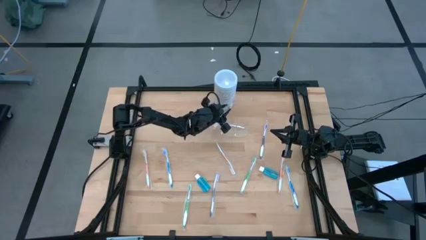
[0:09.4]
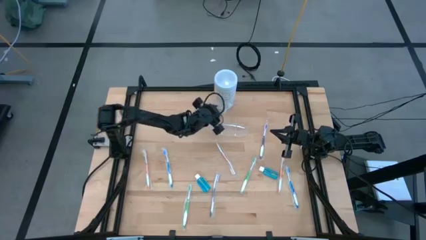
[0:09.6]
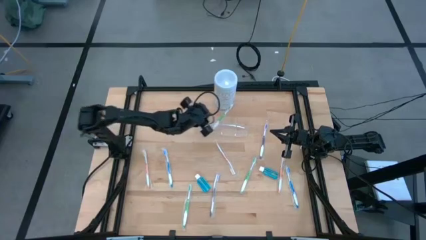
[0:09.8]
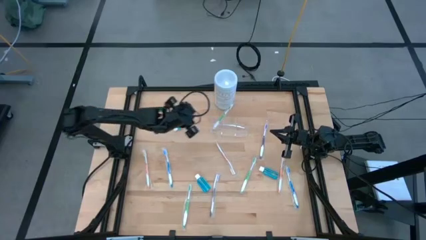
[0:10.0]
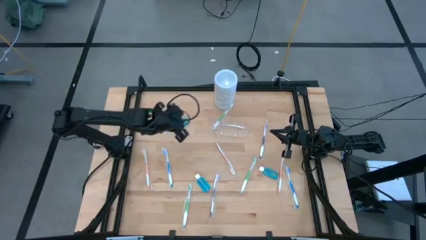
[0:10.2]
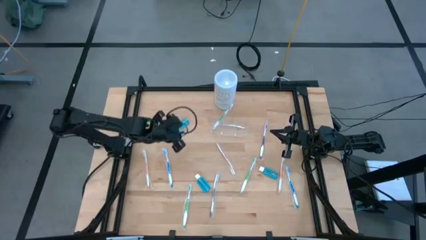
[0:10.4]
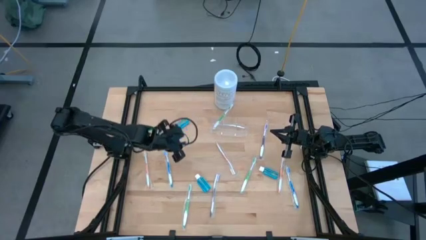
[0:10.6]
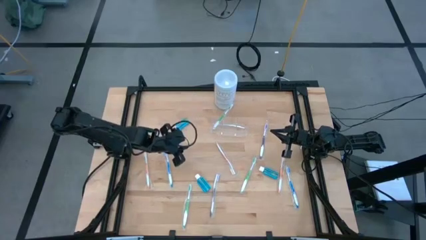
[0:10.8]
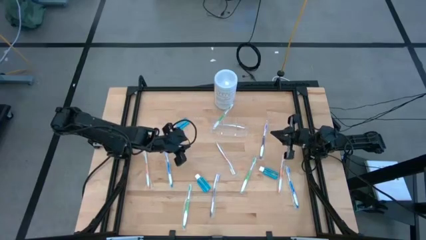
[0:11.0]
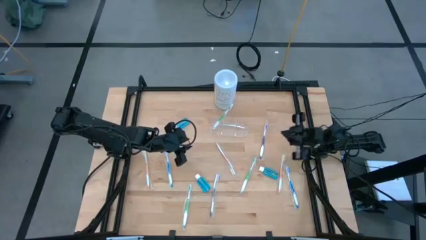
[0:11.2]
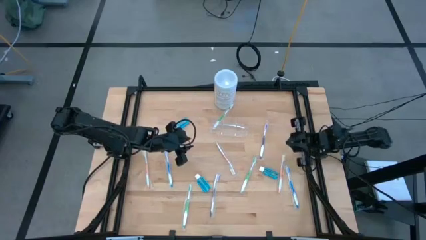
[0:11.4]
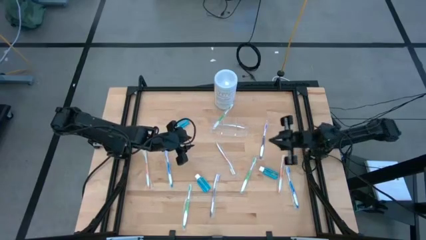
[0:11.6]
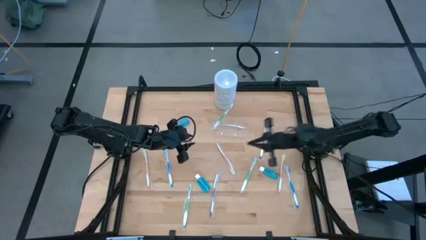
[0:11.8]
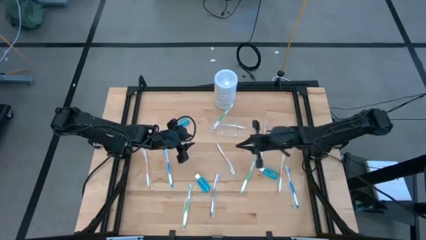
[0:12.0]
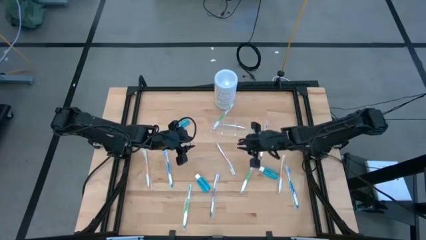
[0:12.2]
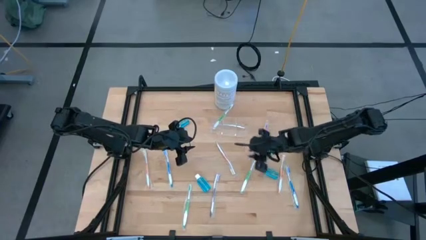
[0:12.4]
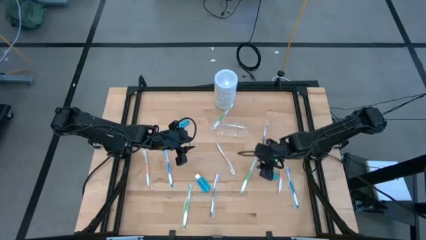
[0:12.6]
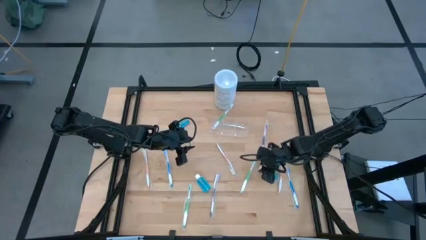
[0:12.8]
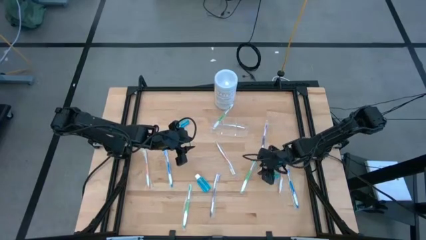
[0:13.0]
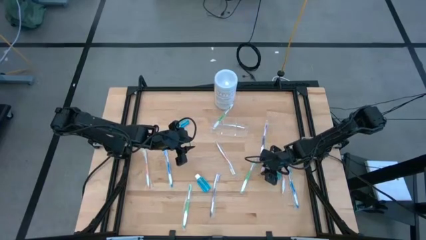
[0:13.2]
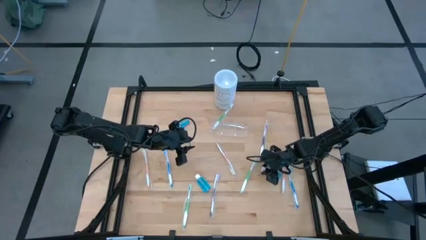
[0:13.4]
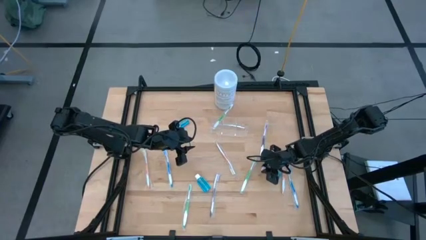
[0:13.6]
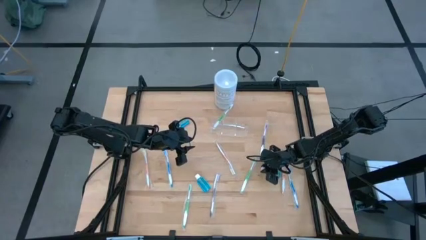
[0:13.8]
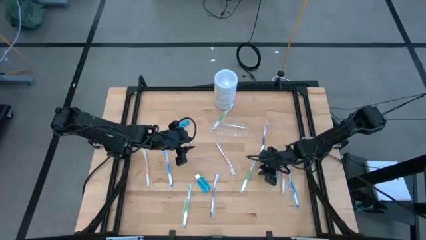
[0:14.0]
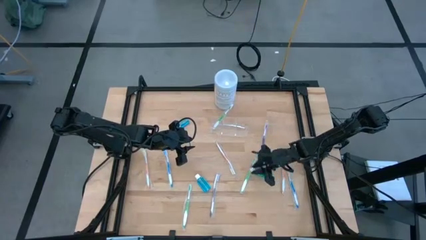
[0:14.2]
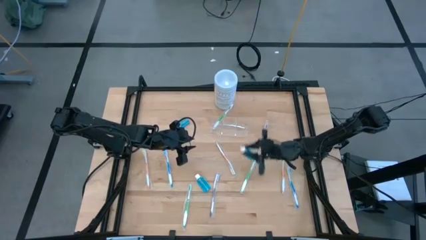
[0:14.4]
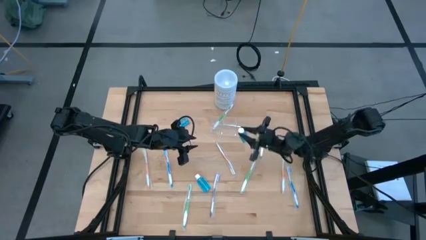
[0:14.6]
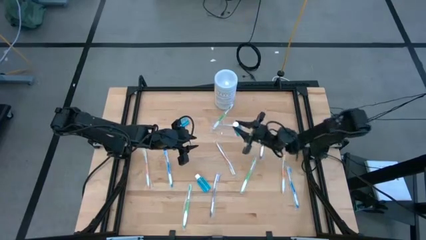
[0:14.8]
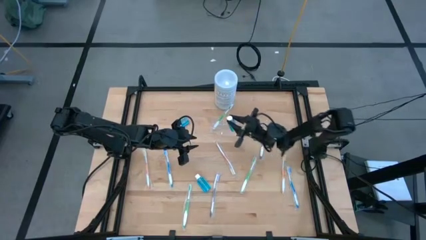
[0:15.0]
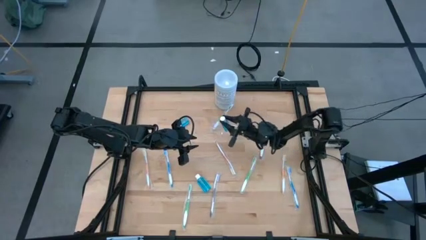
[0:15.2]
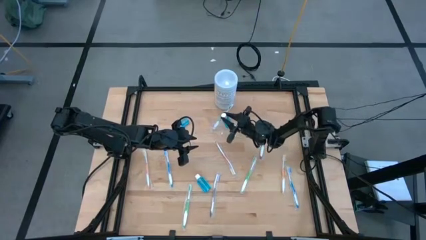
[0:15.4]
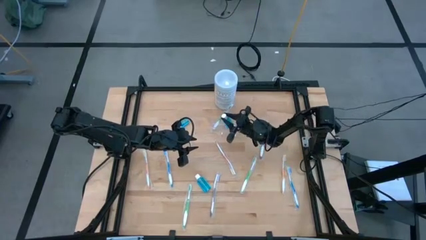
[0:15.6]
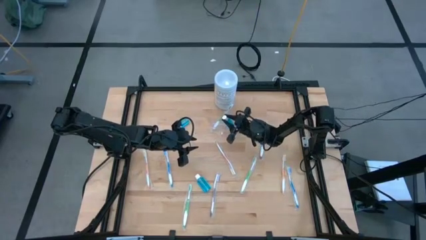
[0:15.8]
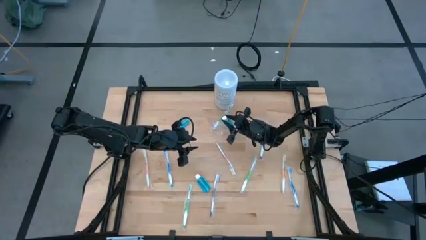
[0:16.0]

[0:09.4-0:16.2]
Task: Pick & Place toothbrushing station
Put the bottom right mouthwash into the transparent organizer

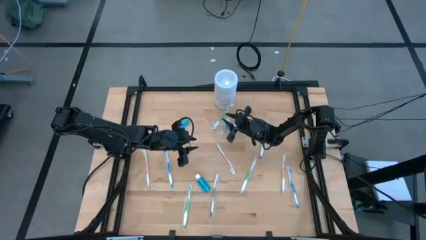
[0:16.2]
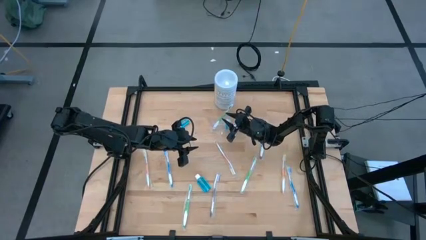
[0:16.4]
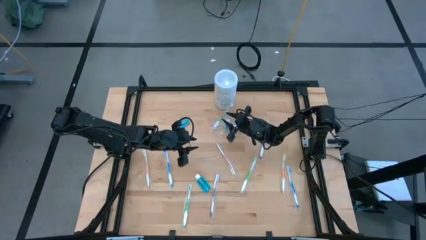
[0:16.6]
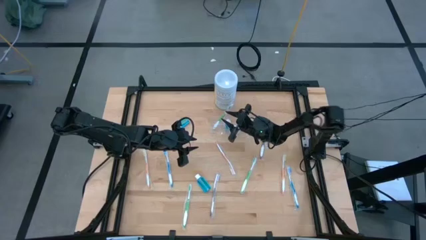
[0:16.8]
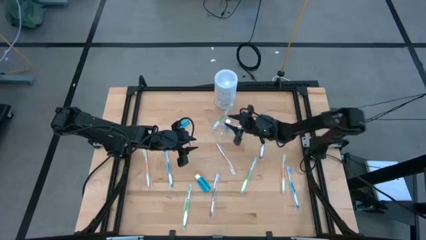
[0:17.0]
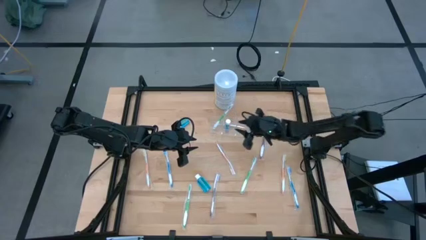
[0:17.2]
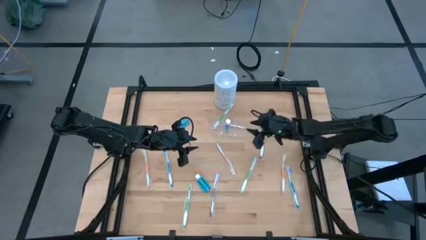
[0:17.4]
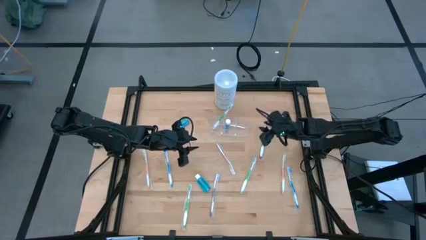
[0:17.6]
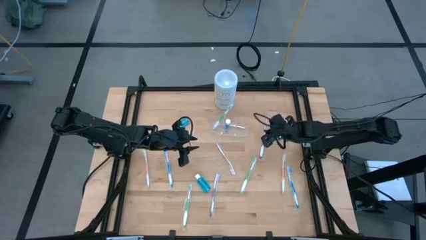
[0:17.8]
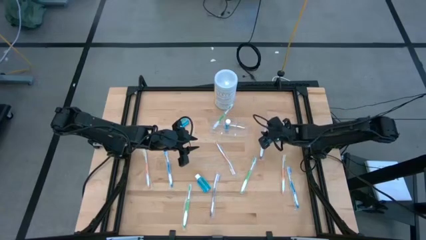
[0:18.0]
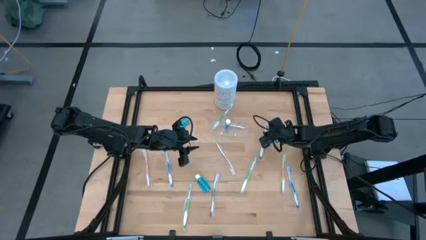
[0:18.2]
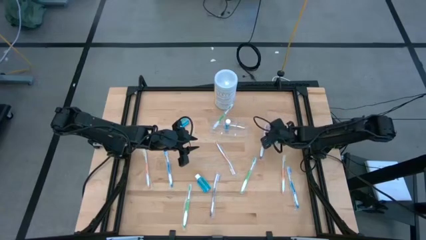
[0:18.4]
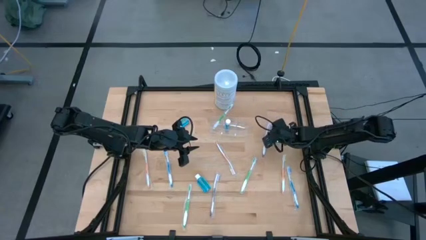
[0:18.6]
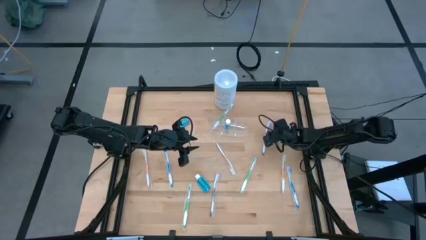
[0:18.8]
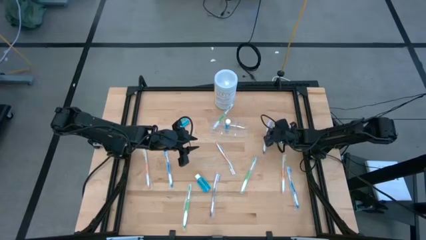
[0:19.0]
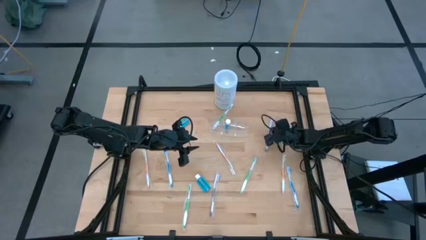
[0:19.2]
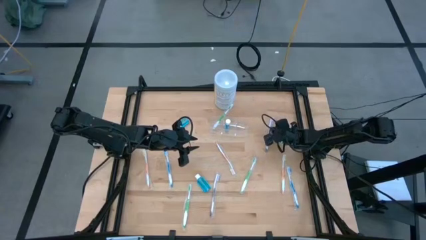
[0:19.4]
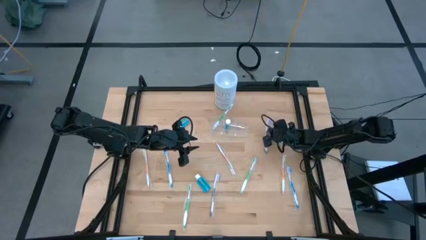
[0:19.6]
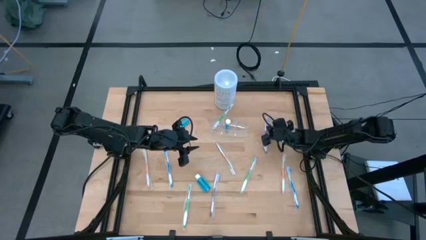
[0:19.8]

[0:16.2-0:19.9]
Put the top purple toothbrush into the transparent organizer

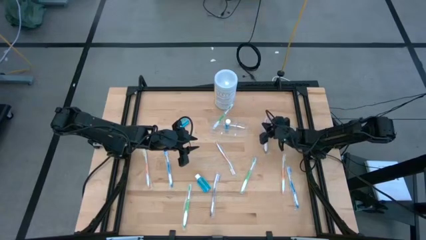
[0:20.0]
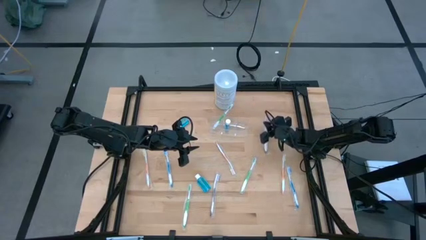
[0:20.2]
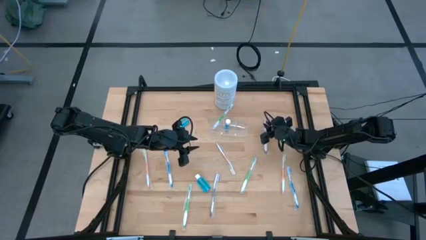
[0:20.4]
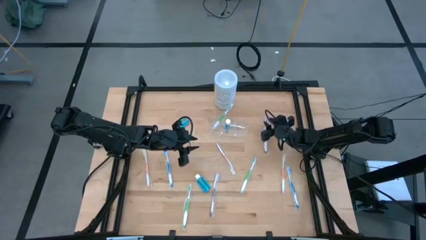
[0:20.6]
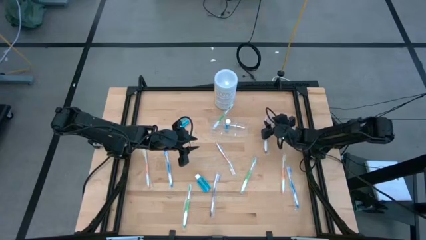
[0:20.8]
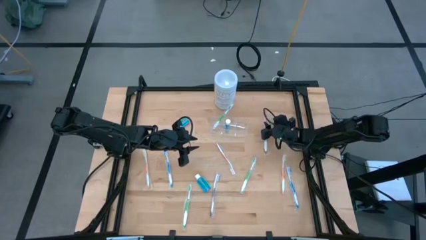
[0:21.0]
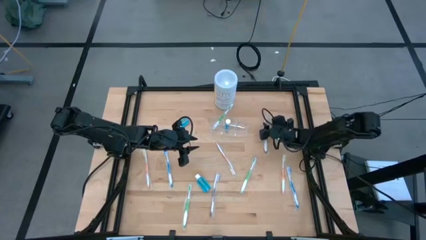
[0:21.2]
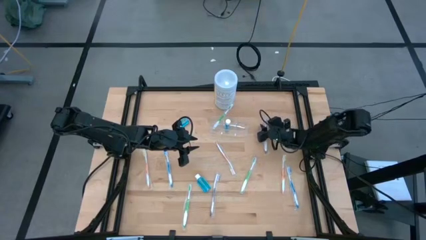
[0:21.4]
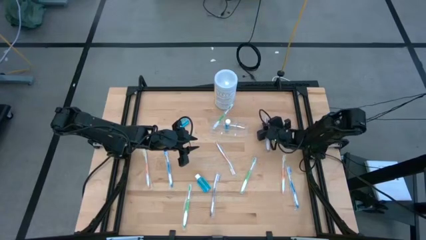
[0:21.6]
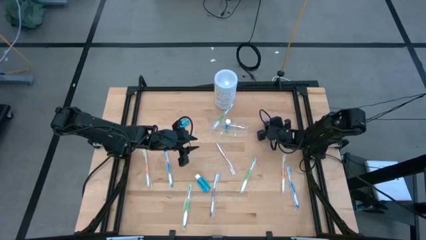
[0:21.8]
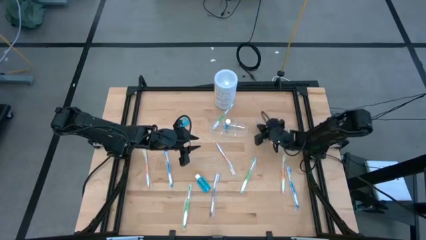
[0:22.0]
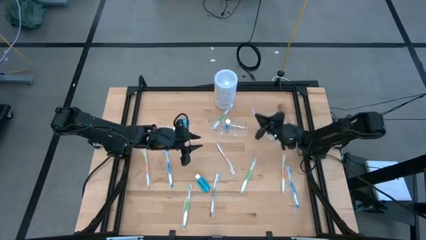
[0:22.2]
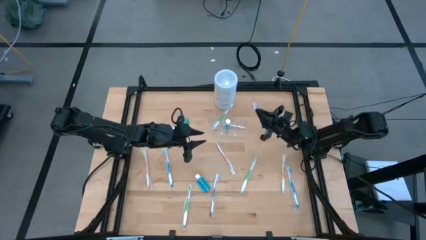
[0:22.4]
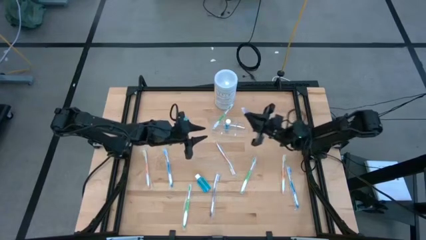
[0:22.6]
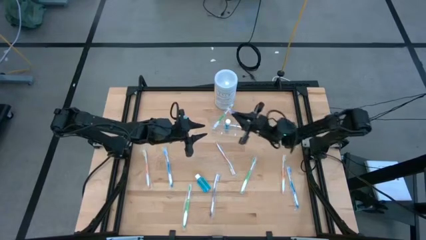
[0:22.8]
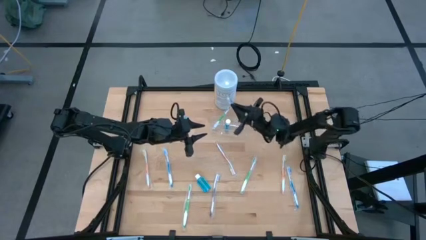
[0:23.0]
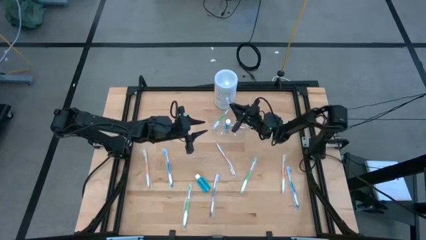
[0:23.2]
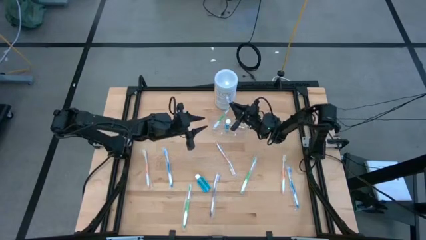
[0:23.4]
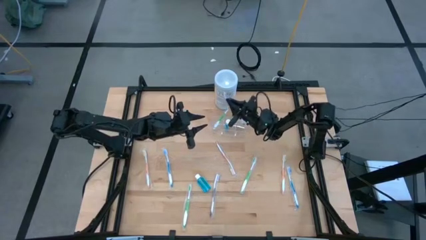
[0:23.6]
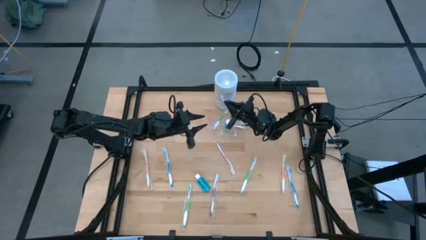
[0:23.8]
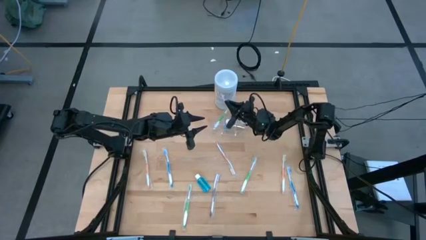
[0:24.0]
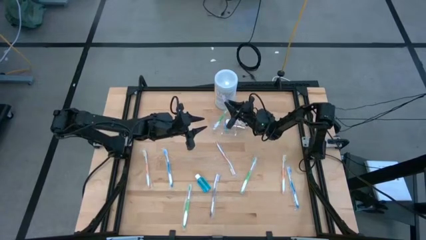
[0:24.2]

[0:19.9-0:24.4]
Put the top purple toothbrush into the transparent organizer

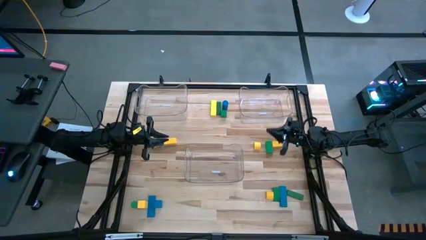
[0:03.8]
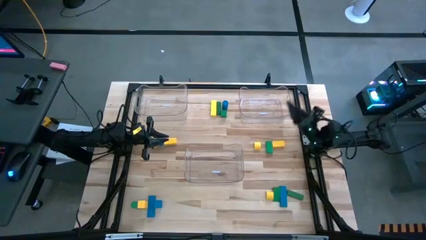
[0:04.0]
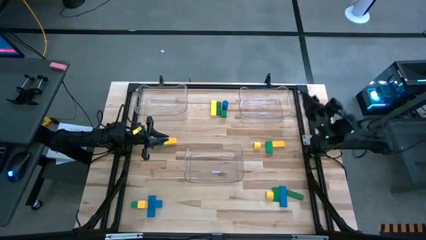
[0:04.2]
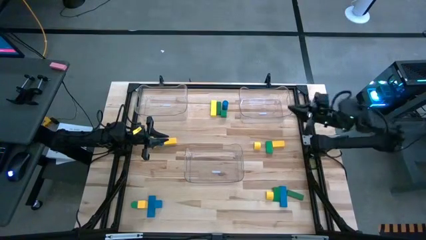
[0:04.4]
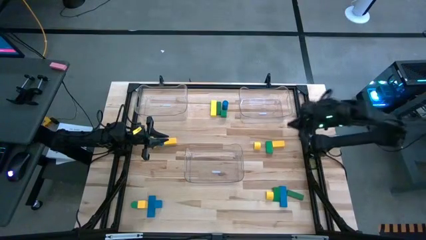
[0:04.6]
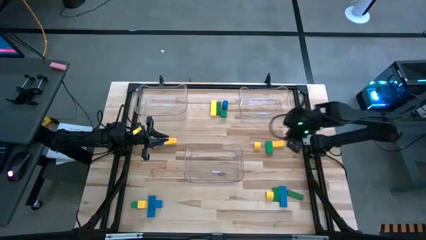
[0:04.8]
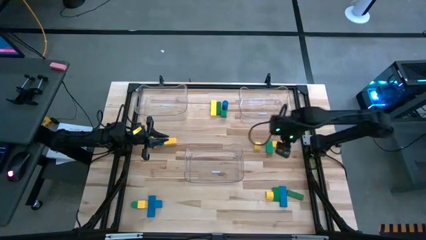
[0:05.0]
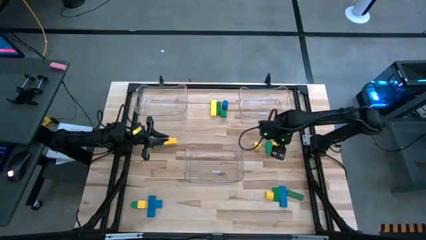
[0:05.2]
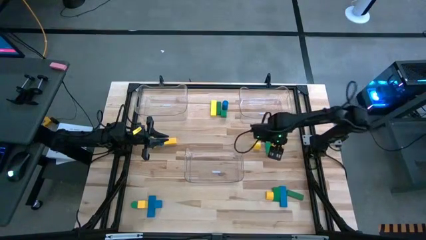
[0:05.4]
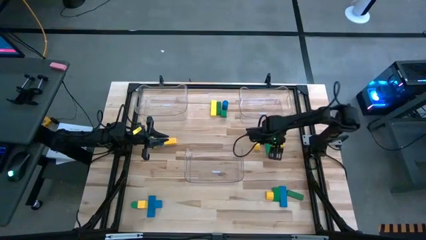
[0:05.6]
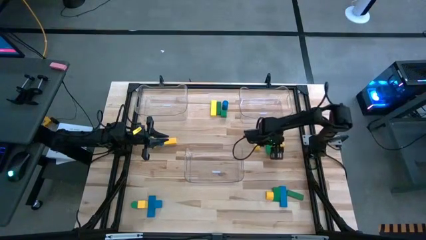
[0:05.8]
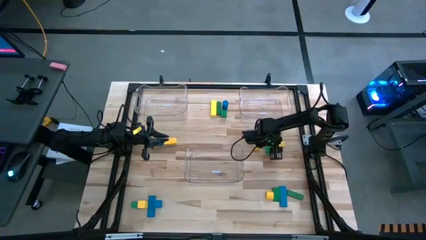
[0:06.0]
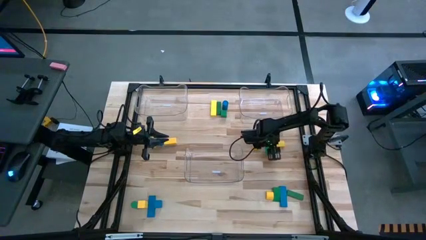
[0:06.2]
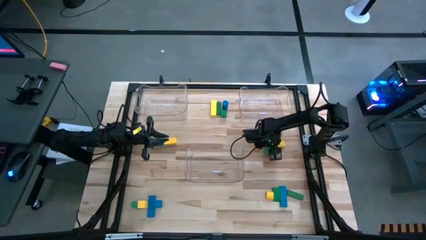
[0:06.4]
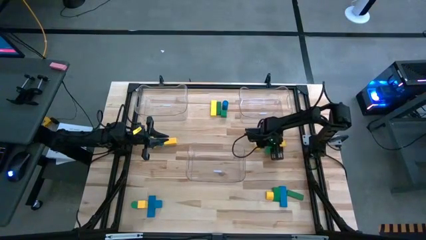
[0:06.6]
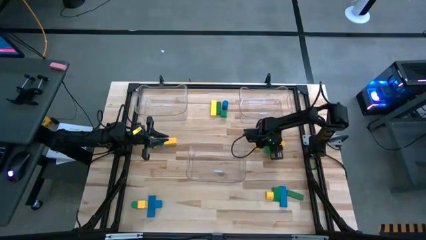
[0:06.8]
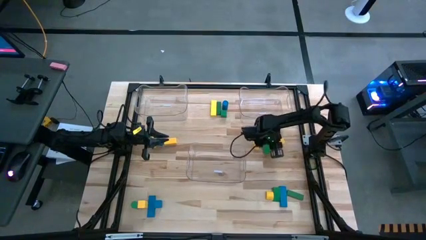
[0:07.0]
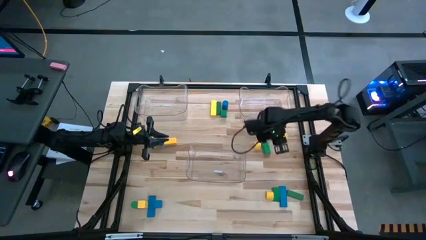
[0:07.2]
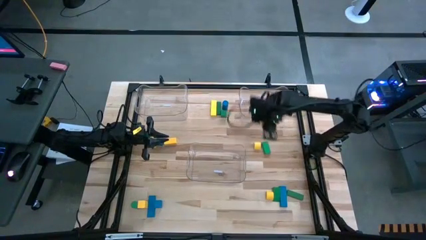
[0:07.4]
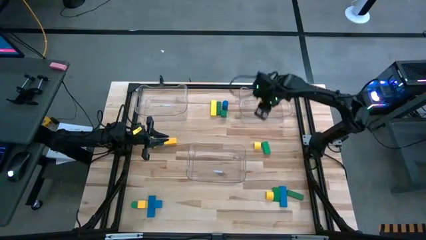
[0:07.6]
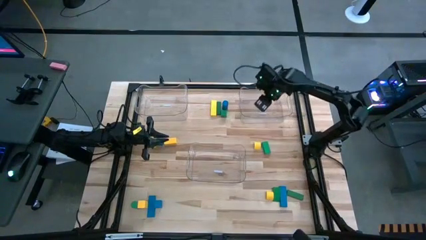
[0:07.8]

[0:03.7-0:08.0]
Task: Sort blocks
Put the yellow block into the right transparent bin
